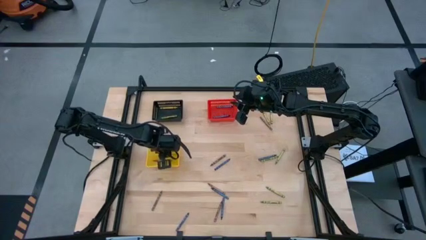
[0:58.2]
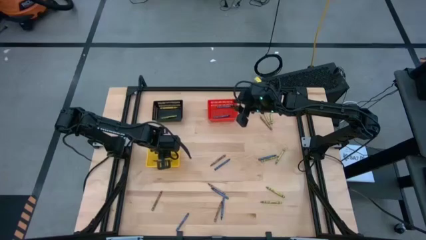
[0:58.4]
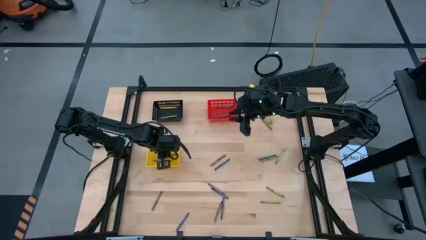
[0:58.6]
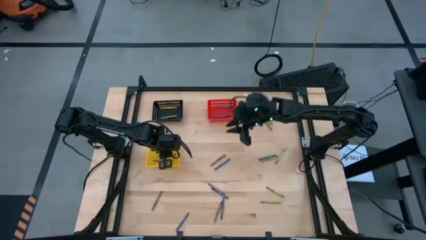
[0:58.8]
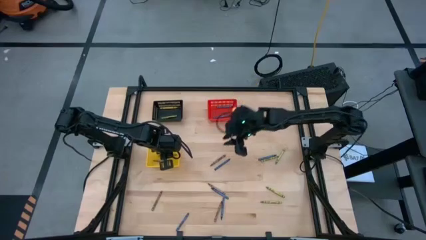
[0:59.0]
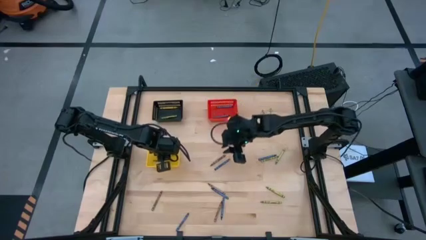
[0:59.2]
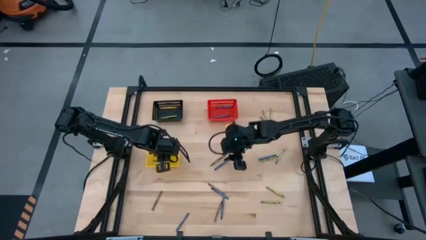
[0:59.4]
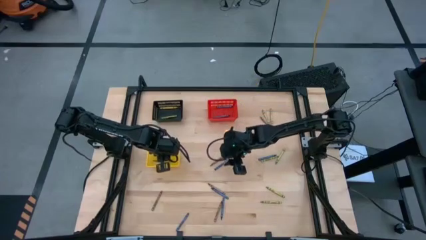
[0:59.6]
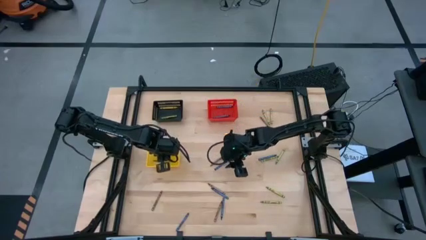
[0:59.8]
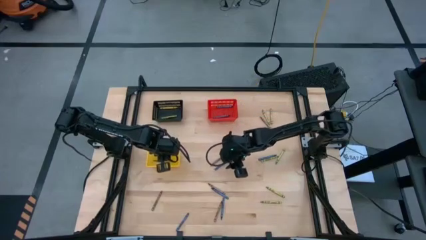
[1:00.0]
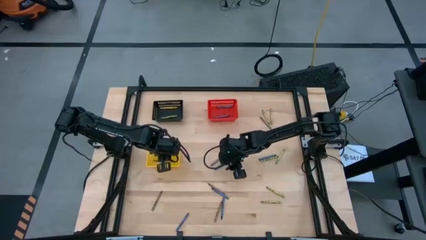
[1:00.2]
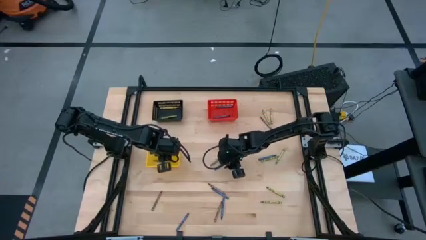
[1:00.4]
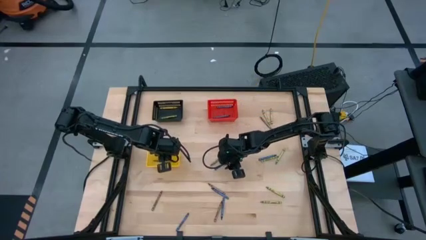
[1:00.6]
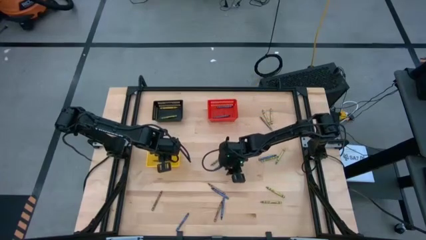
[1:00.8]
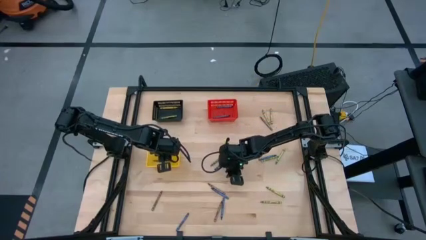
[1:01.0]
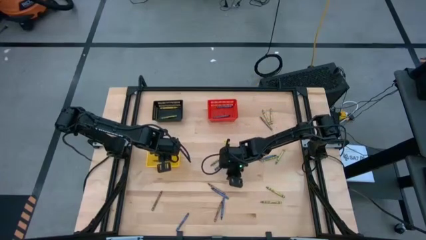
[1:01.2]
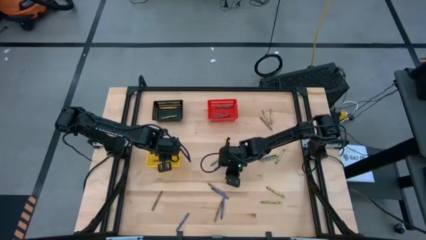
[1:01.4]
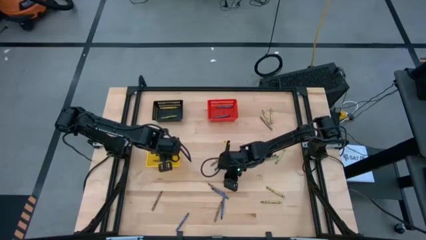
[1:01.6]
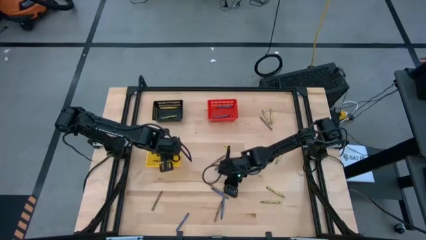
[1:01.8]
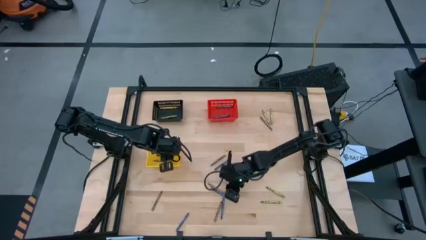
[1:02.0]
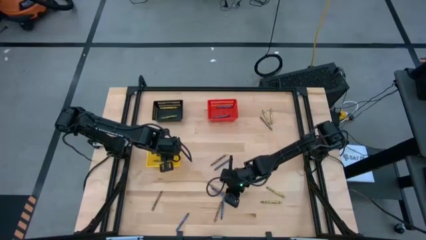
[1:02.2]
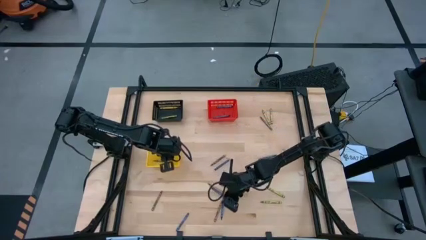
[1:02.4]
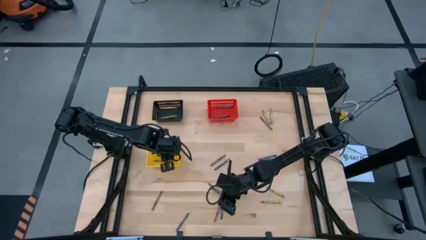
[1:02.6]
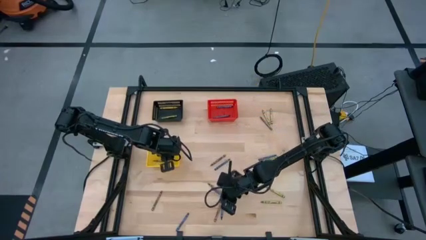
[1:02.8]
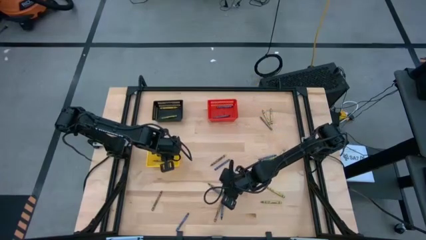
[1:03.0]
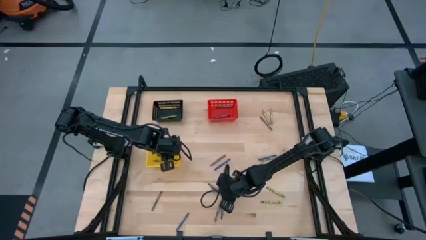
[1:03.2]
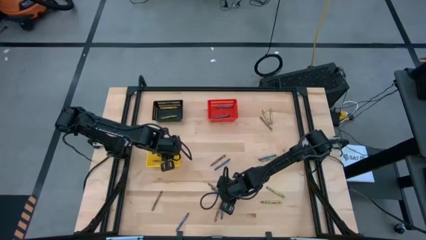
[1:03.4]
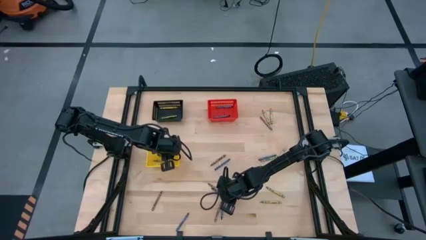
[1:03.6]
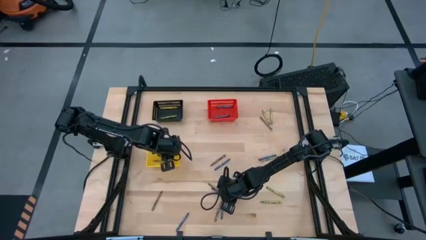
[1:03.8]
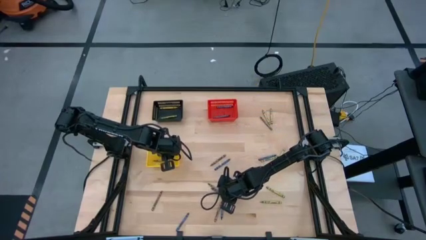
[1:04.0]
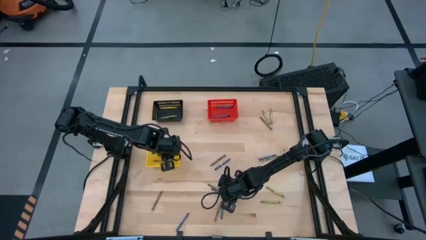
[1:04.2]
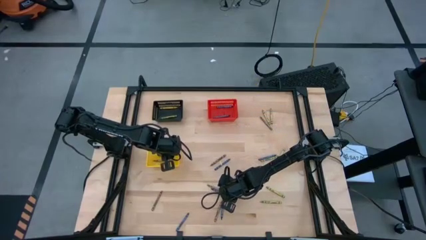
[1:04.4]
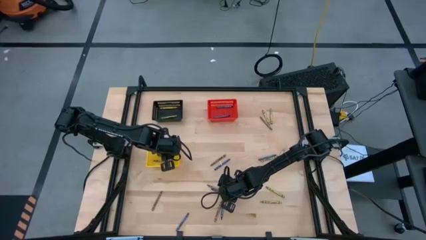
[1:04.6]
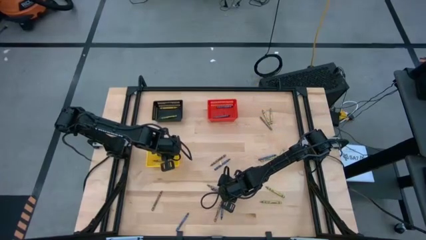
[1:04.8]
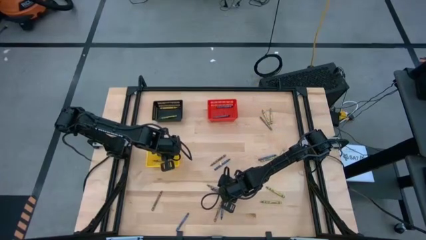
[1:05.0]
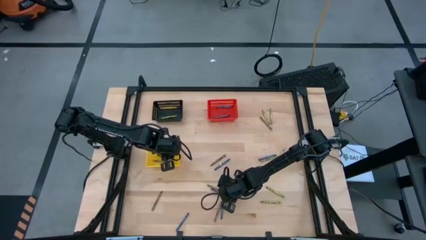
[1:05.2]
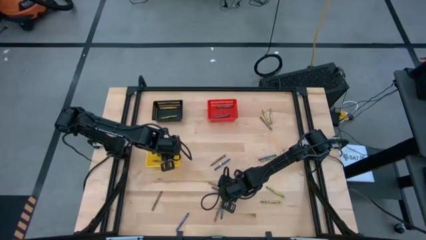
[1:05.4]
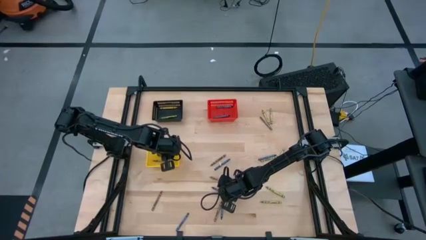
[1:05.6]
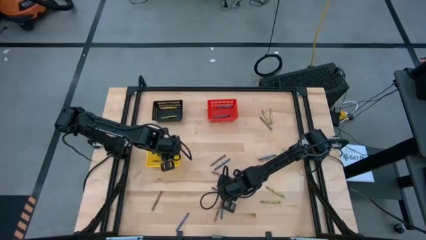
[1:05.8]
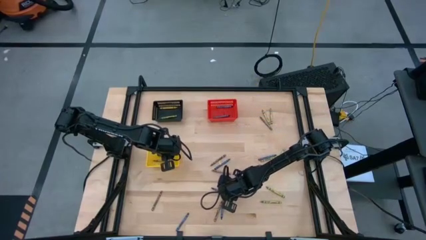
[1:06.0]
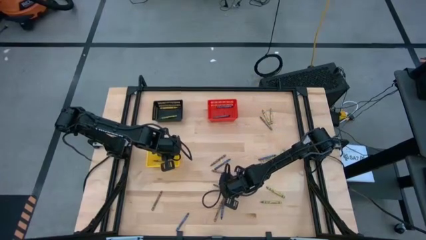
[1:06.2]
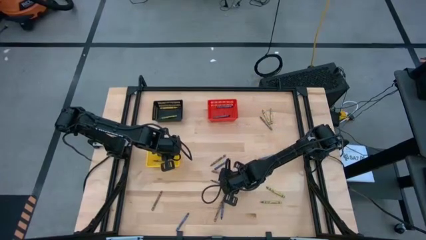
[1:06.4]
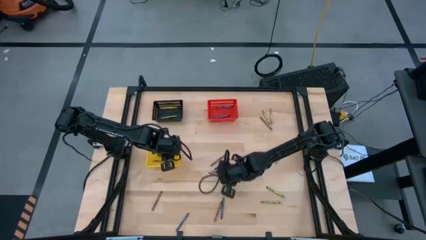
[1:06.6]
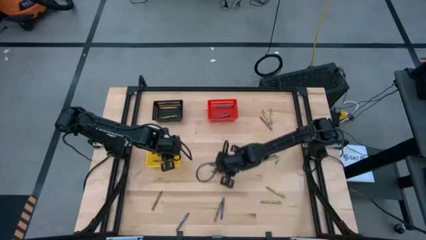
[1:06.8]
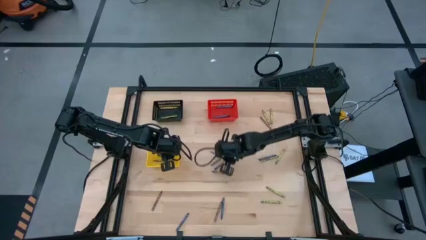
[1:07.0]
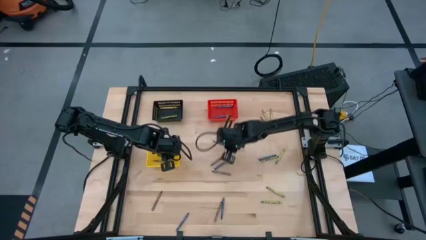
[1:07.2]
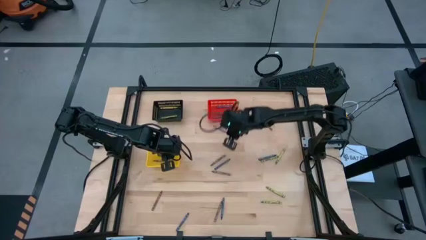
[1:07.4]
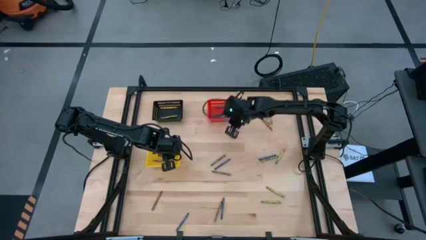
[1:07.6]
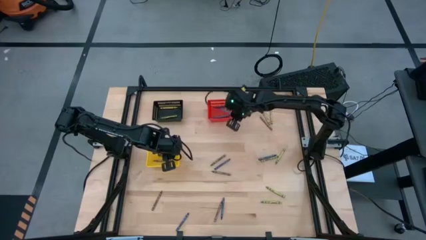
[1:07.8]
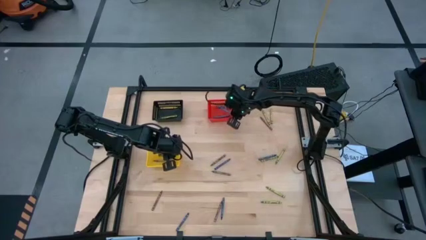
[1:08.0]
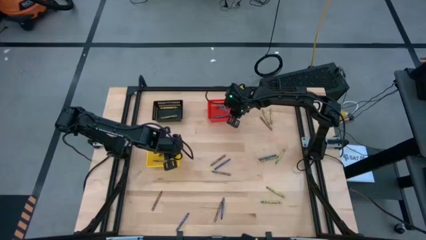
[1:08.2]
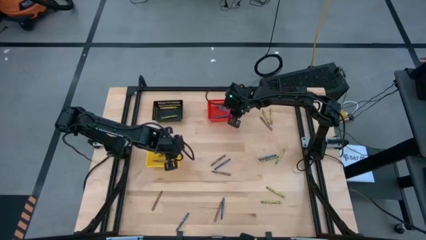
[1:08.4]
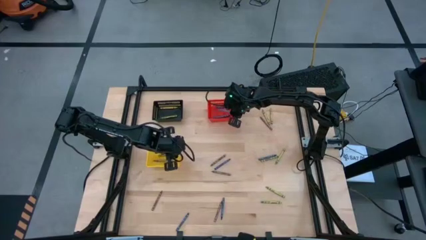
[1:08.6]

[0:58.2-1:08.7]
Task: Sort crayons
Put the blue crayon into the red basket

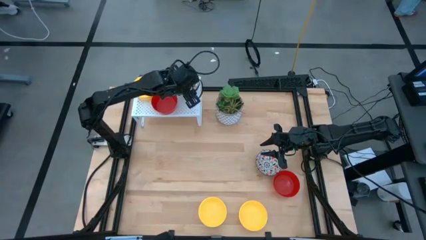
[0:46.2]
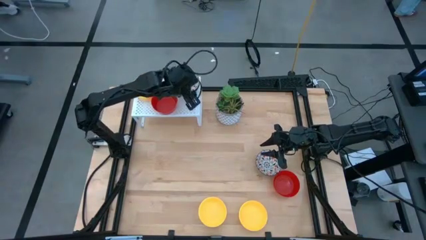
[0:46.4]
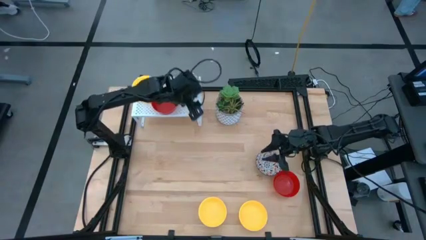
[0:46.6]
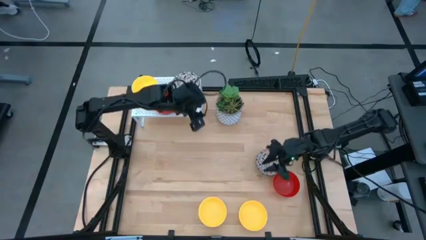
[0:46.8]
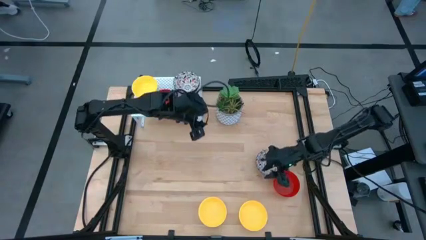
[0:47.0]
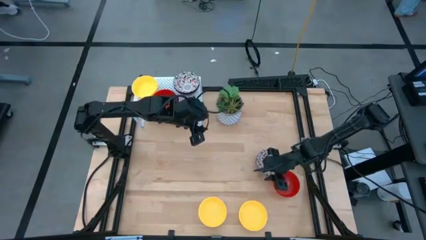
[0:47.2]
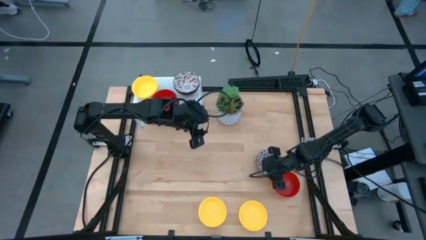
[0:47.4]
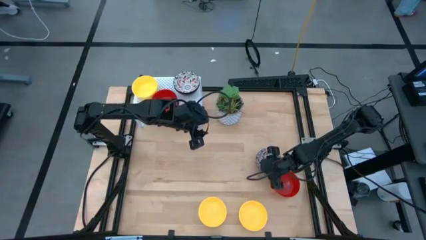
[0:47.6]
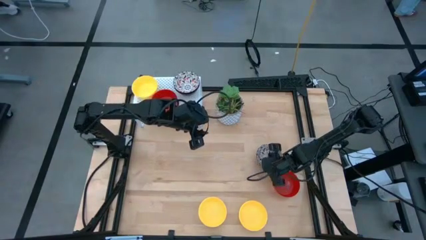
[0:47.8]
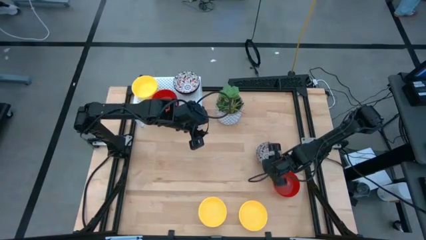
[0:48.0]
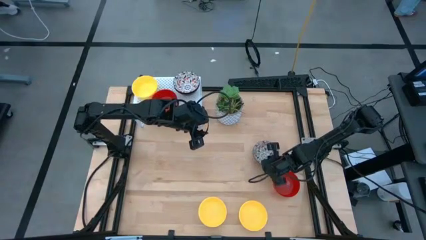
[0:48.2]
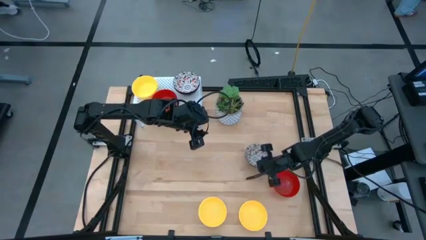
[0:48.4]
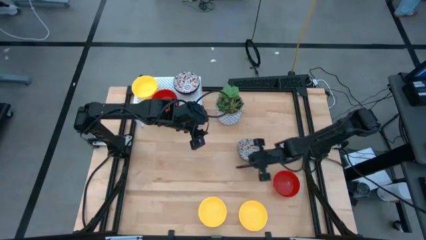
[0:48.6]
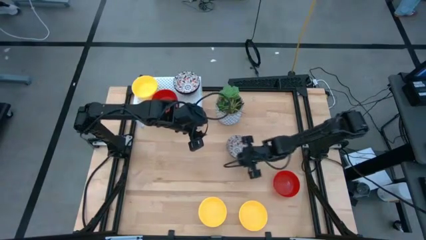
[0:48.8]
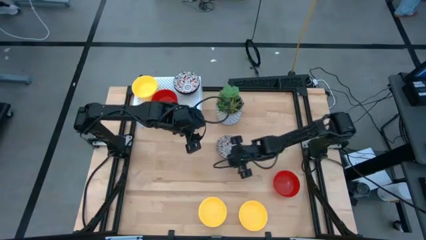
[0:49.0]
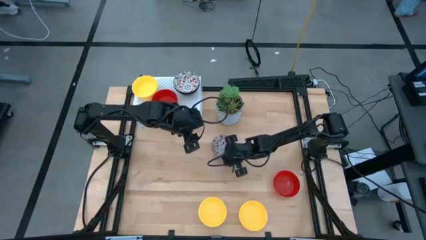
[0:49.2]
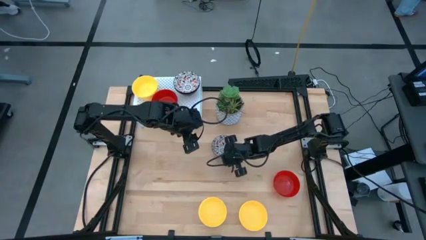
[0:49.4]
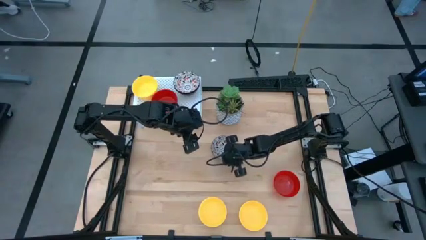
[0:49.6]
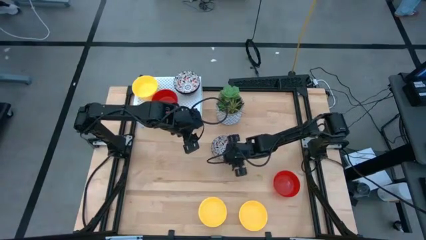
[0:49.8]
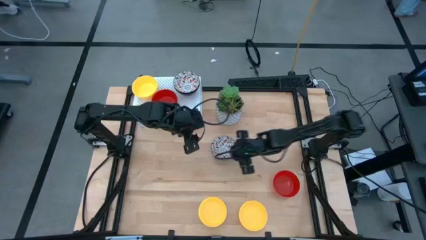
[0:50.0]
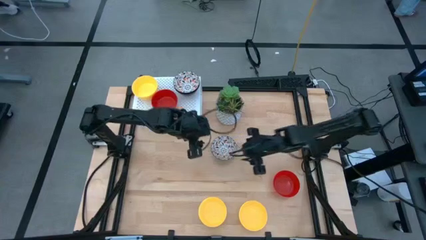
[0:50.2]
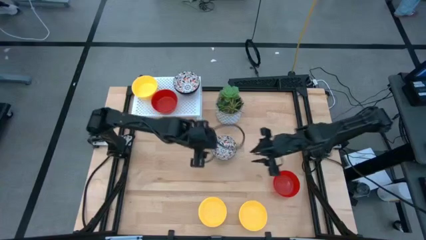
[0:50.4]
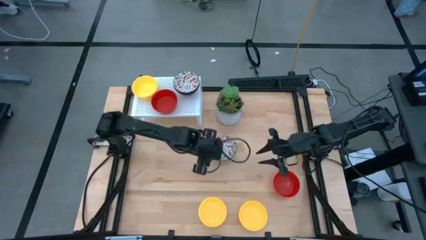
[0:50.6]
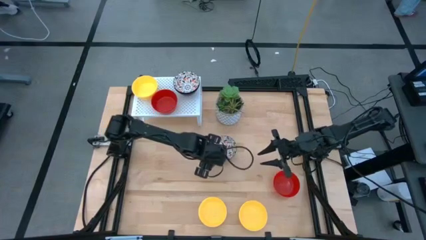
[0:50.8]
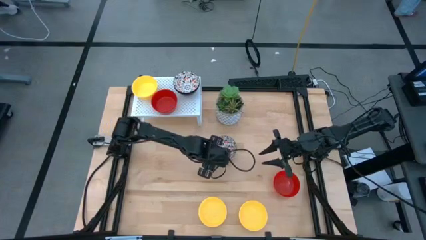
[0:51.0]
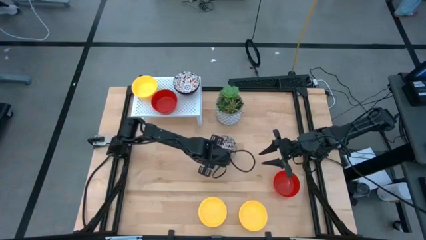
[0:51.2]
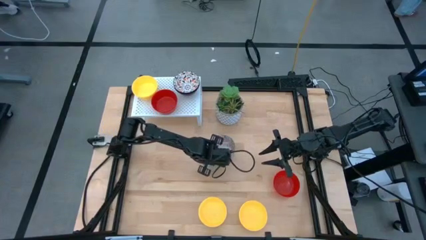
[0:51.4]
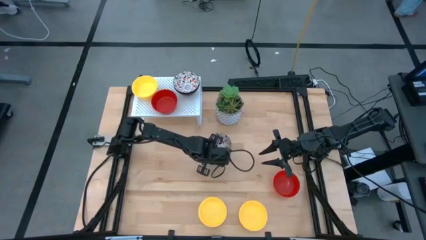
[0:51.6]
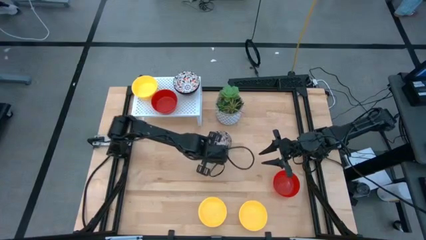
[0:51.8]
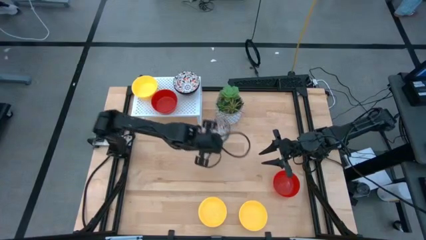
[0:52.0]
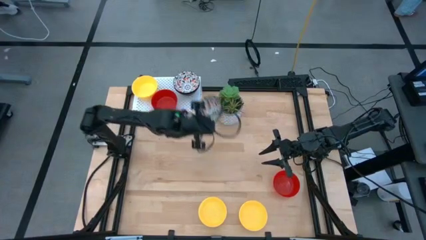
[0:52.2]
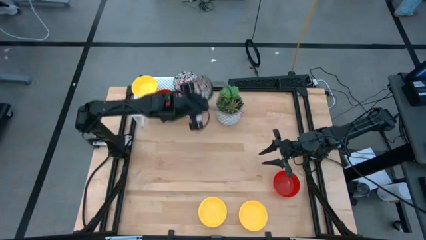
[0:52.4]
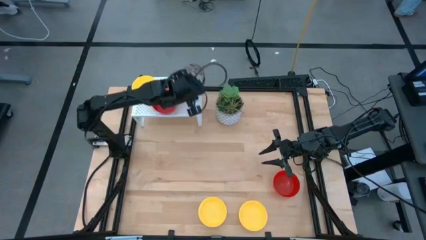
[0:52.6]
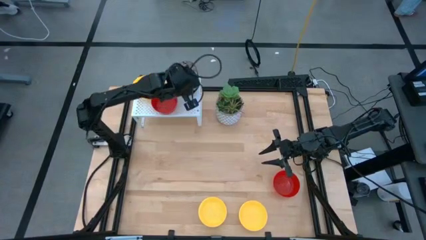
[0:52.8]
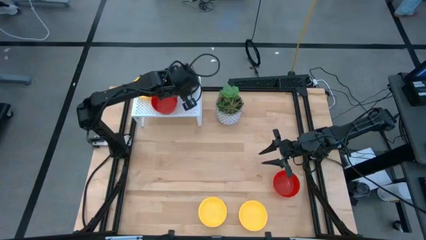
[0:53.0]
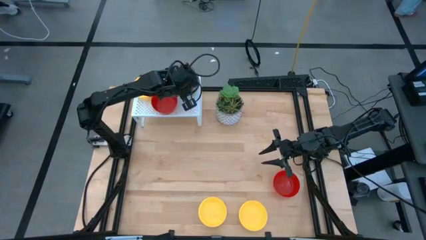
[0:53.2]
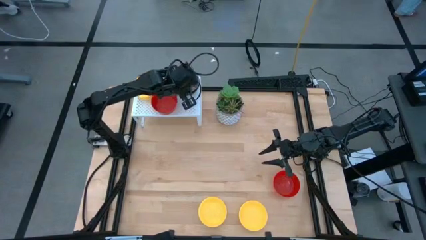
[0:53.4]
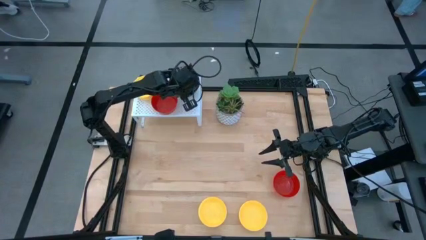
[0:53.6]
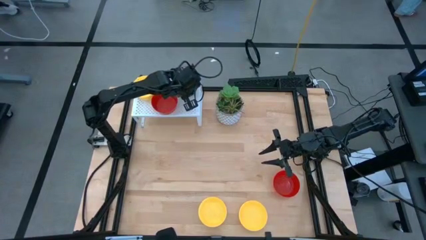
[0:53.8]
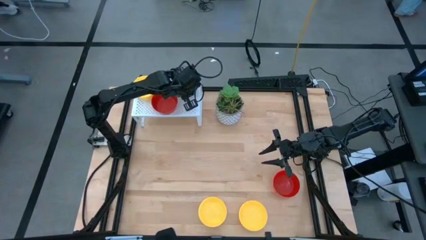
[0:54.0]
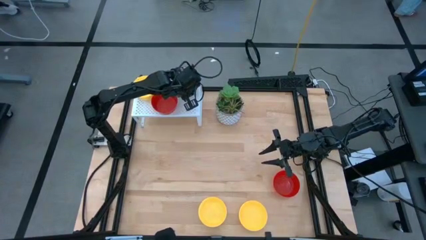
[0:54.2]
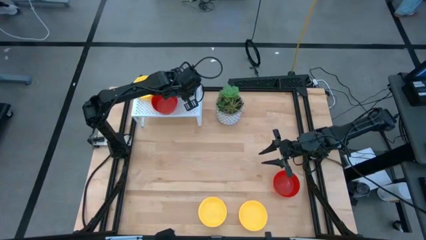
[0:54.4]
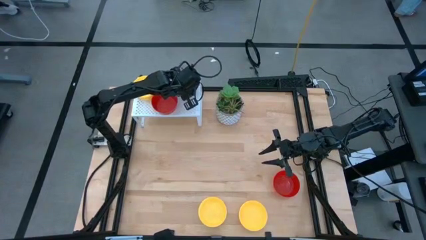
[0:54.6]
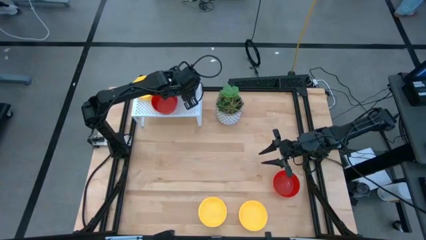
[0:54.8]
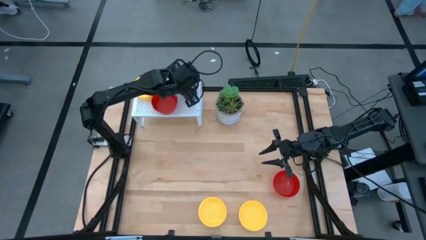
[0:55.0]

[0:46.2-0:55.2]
Task: Pick & Place Mini bowls
Stack the patterned bowl on top of the other patterned bowl on the shelf
